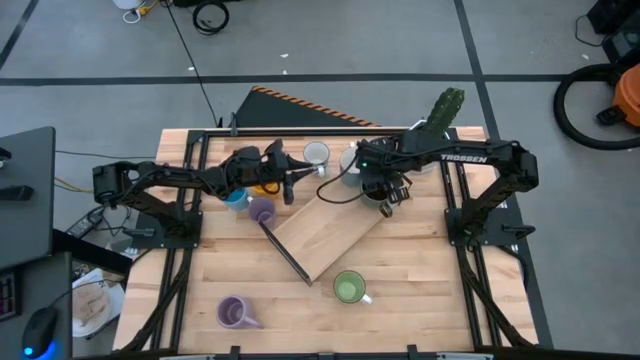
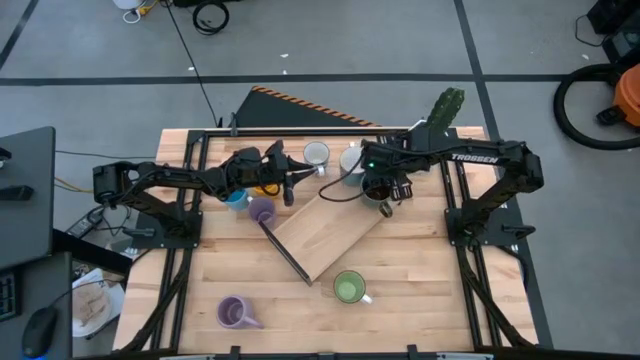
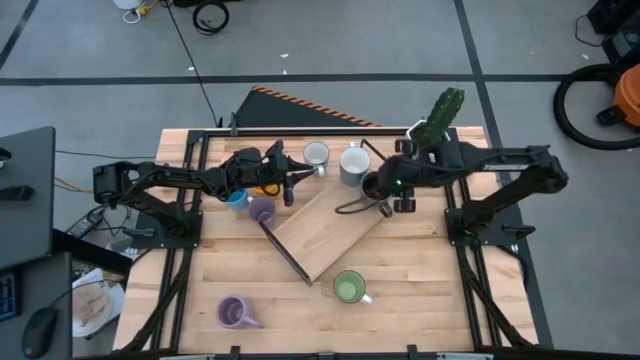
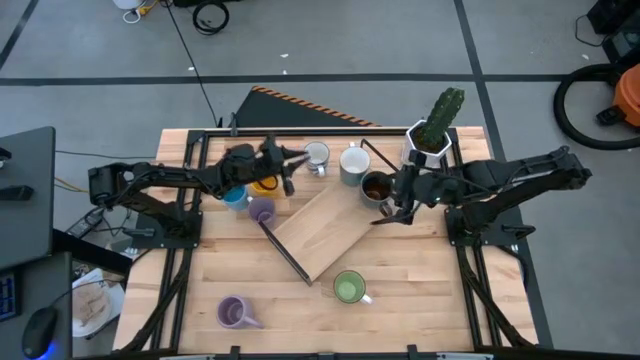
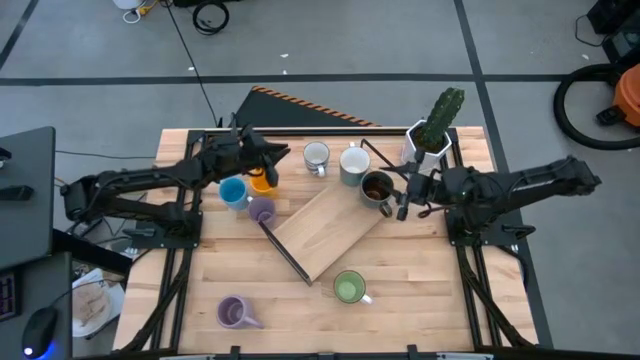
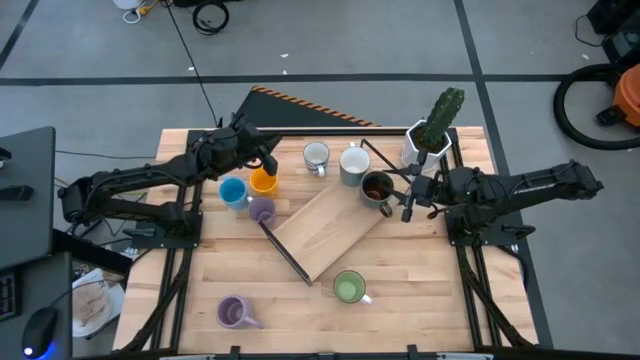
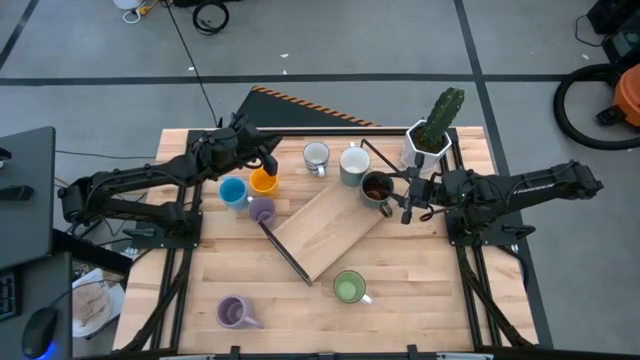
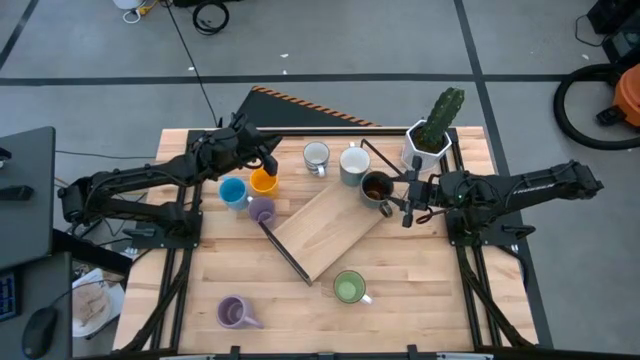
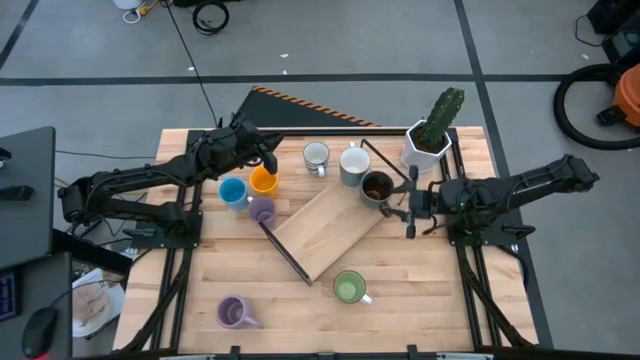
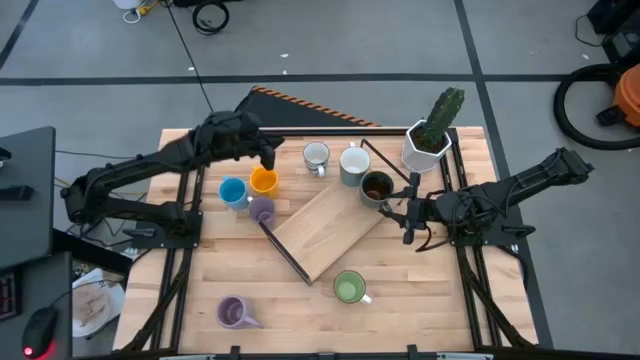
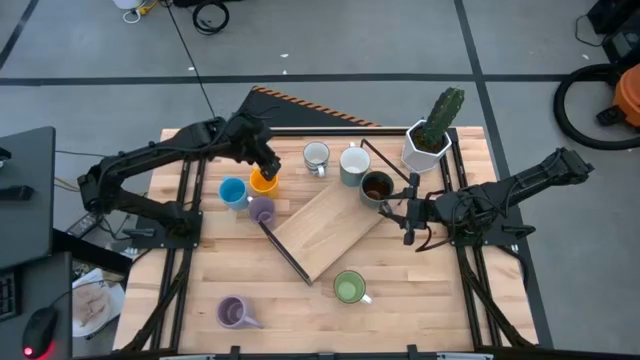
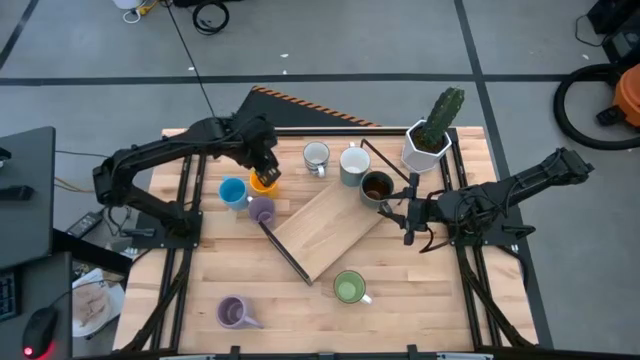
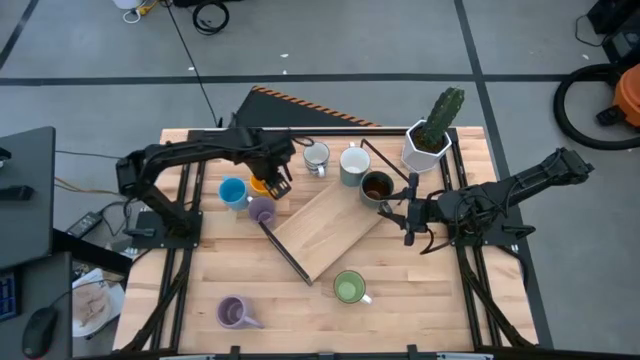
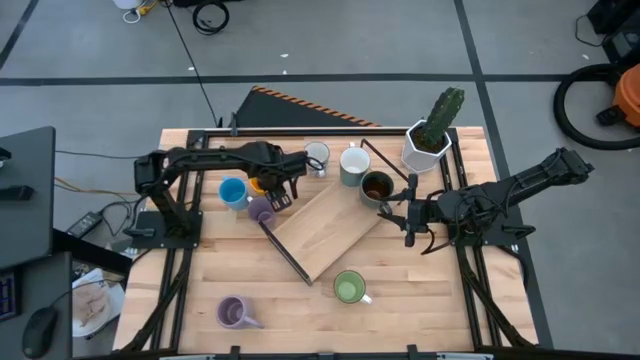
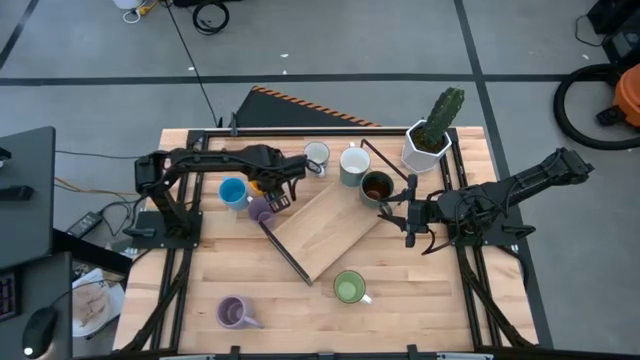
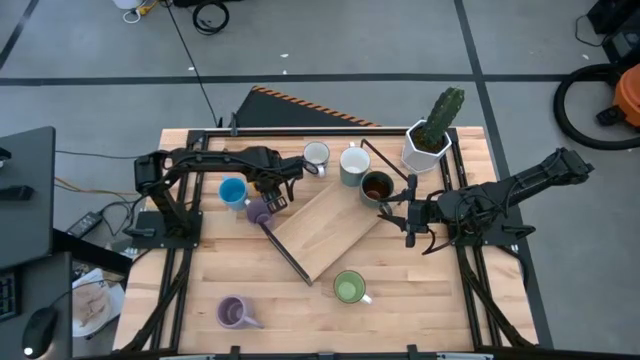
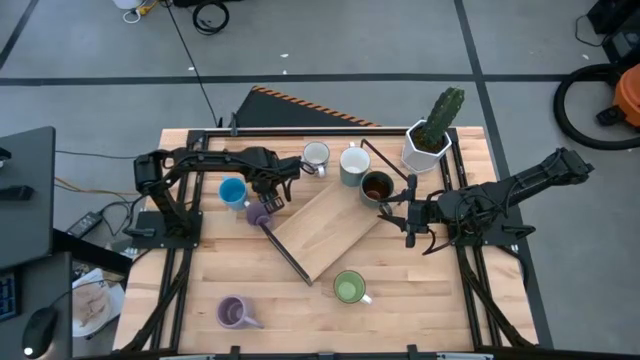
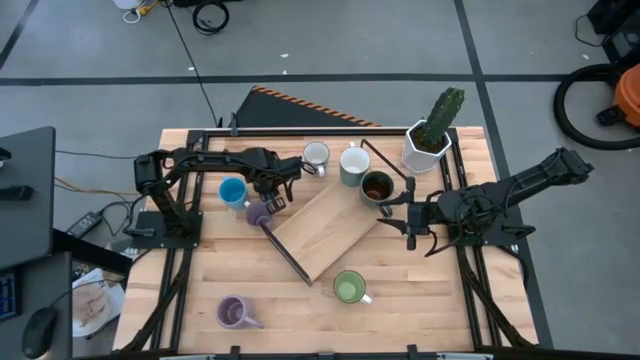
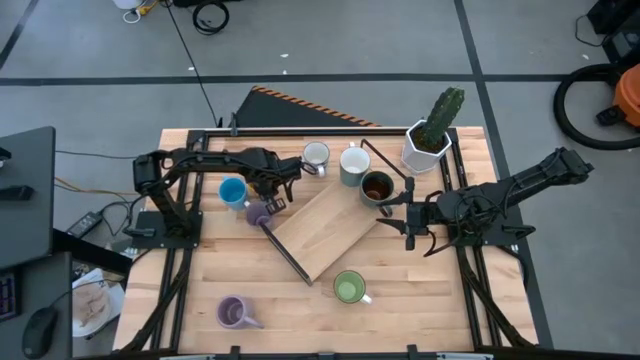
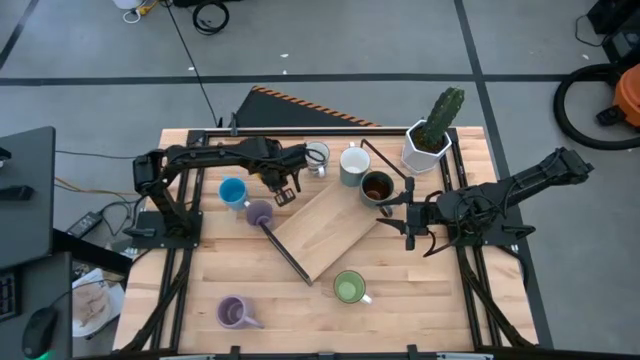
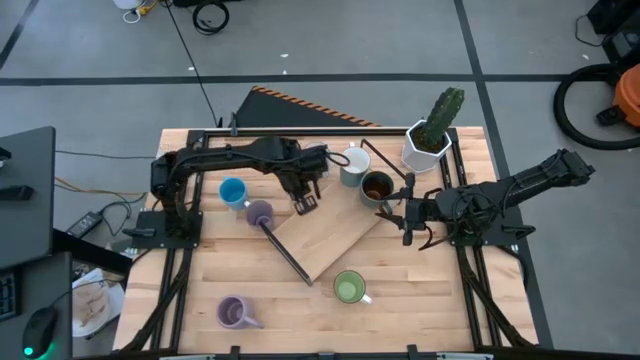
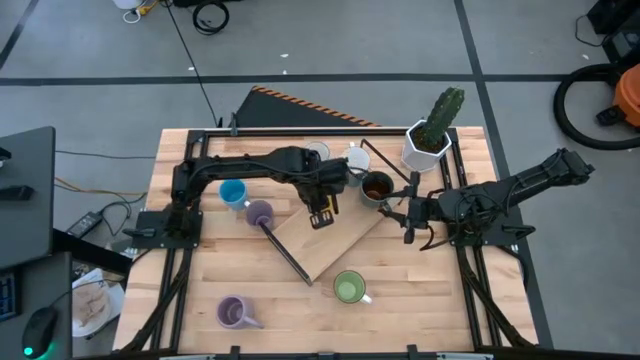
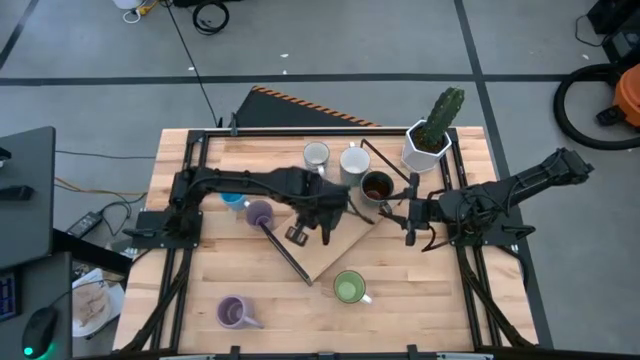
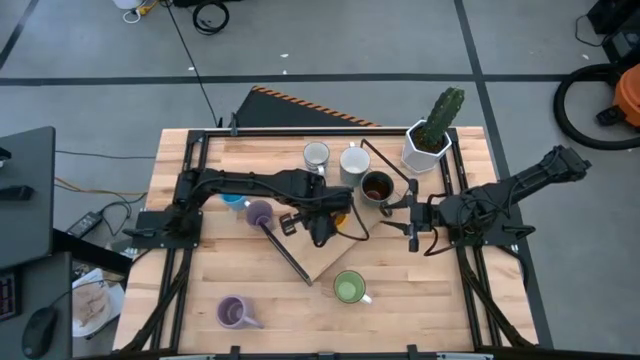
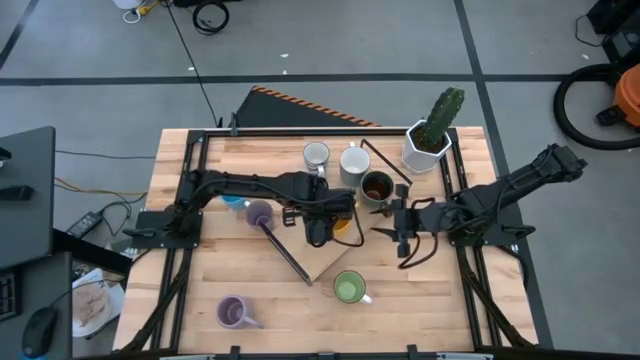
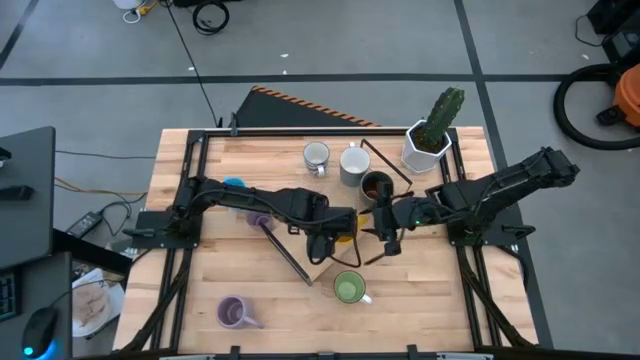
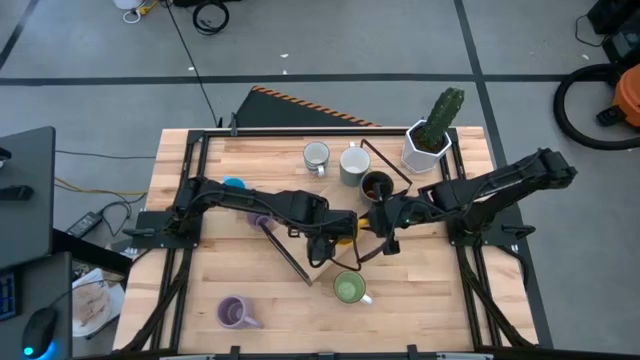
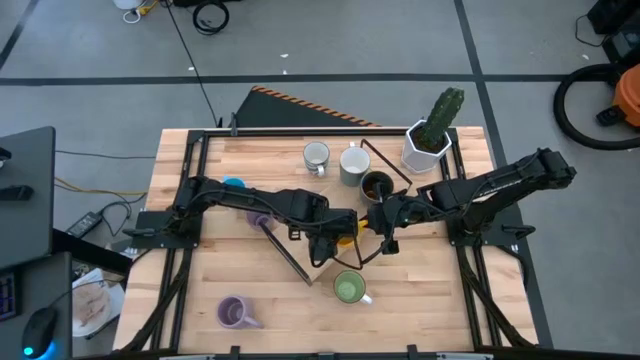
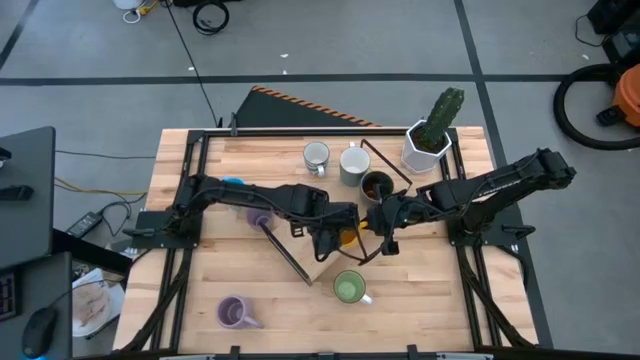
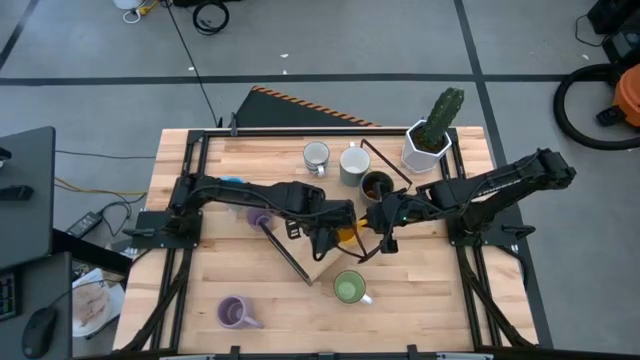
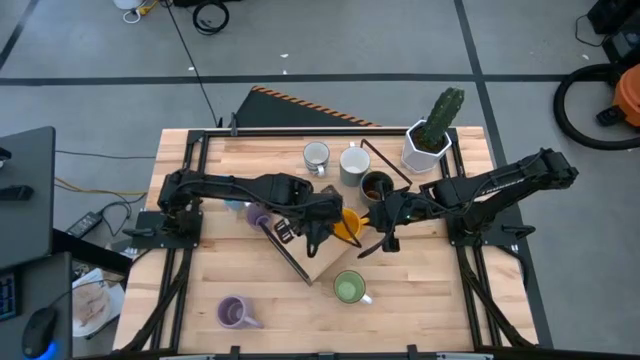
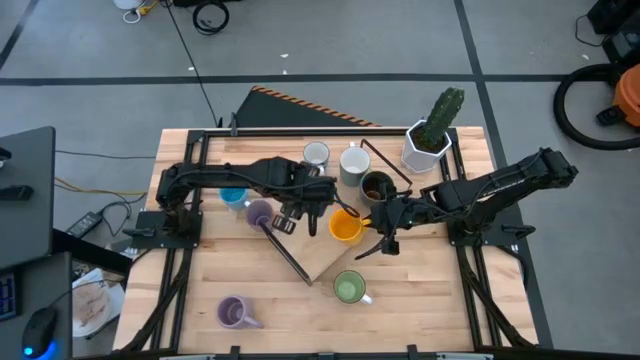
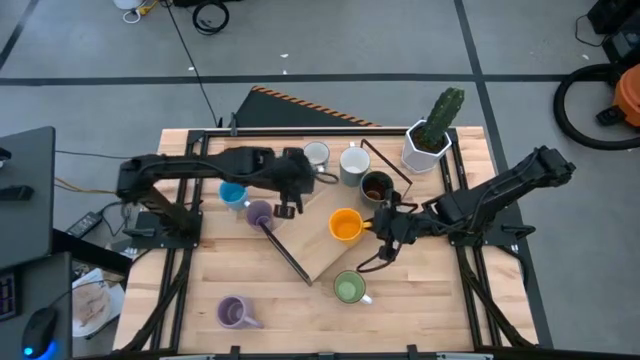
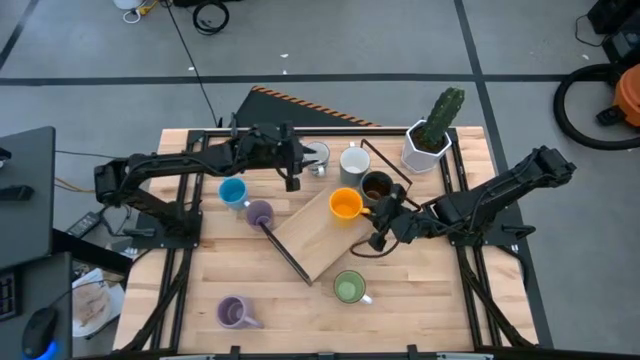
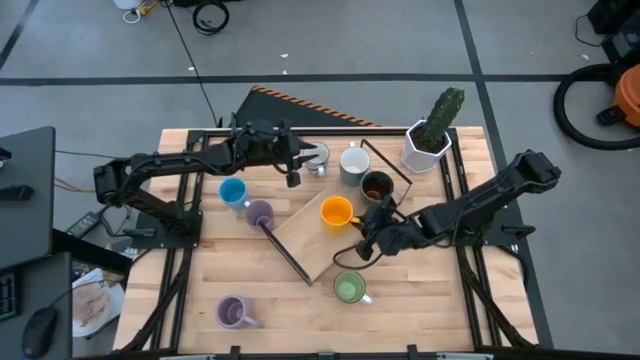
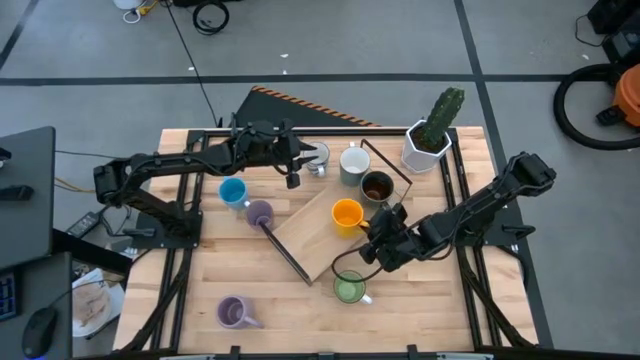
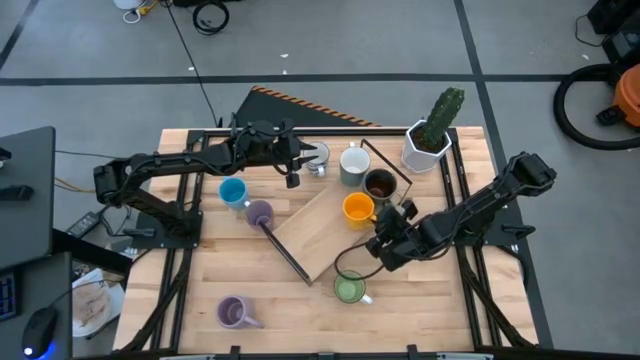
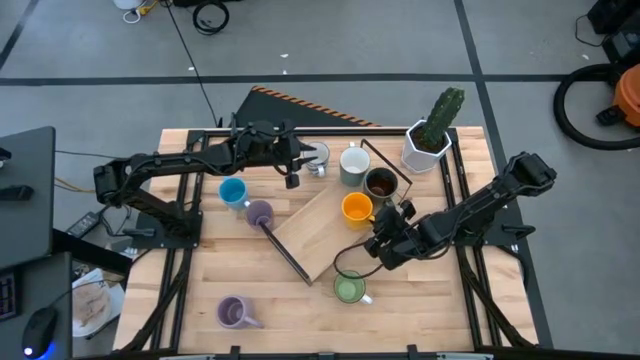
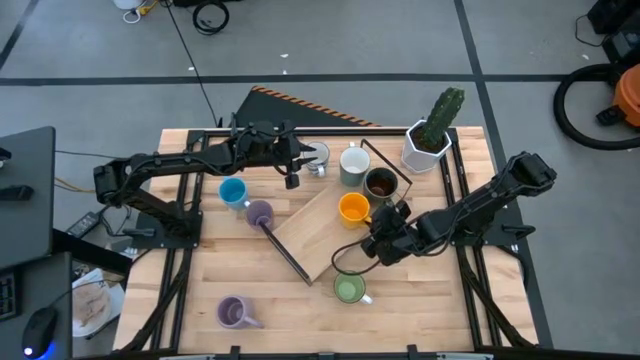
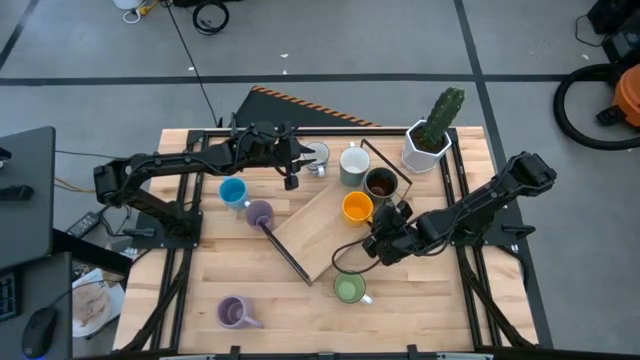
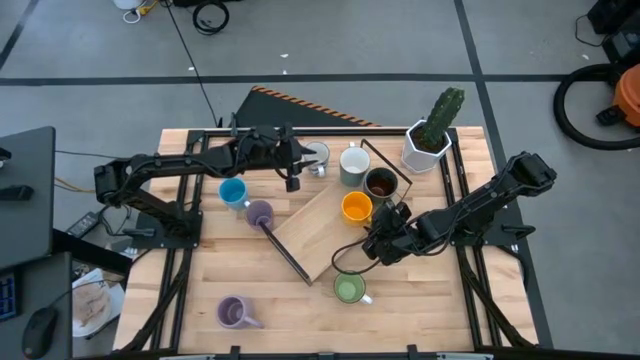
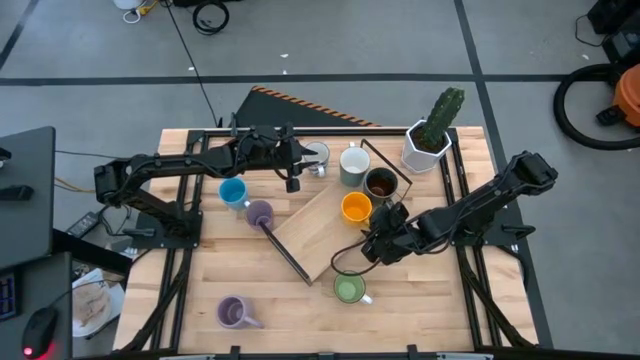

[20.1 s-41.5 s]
Task: Place coffee mugs
Put the yellow mug on the shelf
